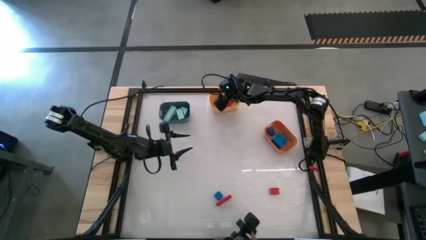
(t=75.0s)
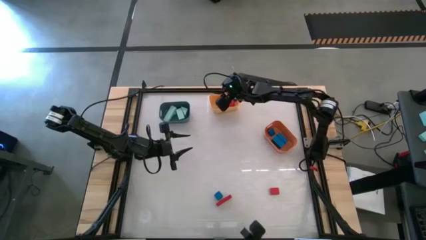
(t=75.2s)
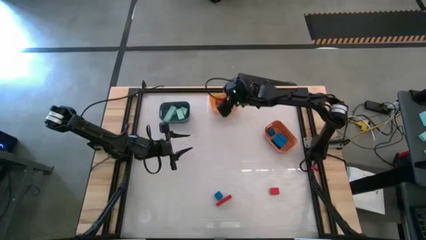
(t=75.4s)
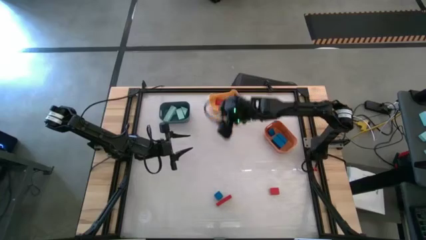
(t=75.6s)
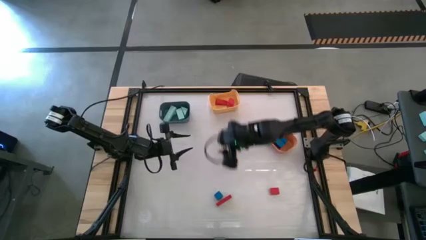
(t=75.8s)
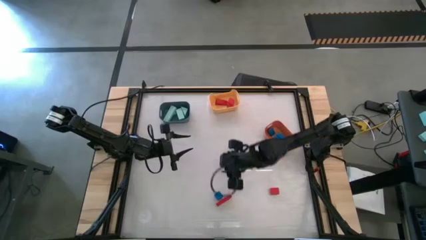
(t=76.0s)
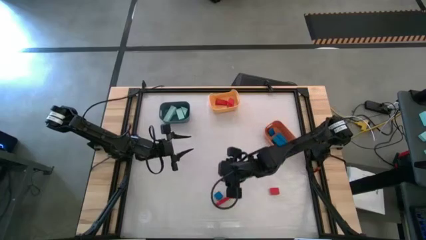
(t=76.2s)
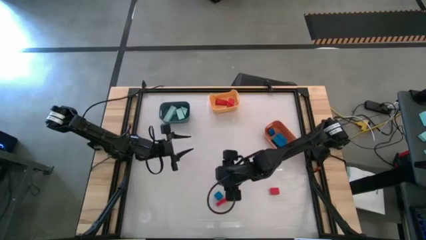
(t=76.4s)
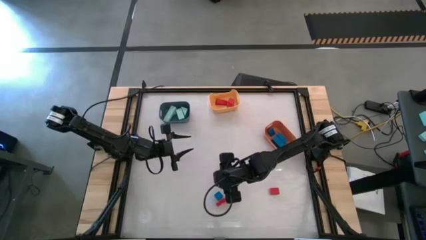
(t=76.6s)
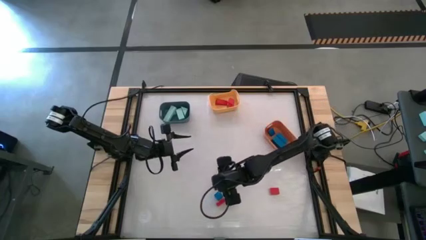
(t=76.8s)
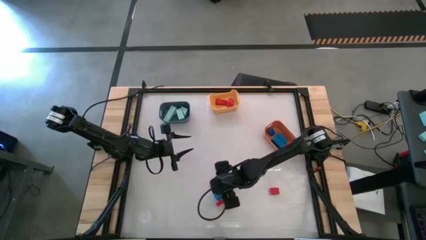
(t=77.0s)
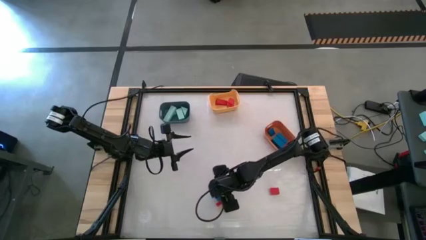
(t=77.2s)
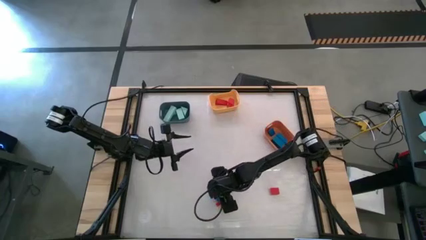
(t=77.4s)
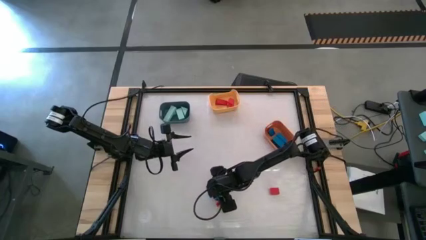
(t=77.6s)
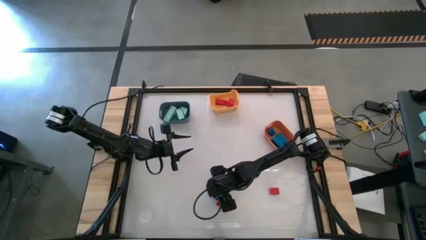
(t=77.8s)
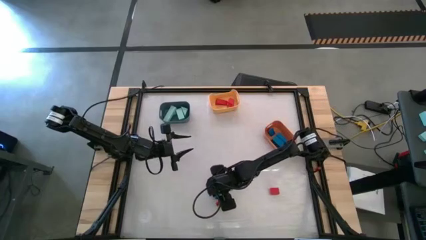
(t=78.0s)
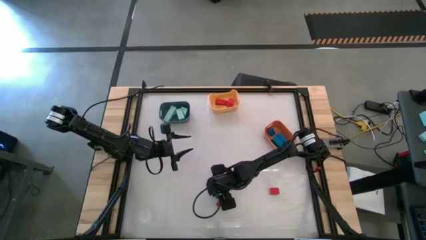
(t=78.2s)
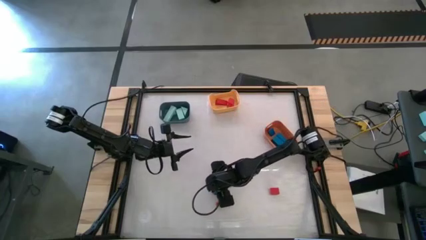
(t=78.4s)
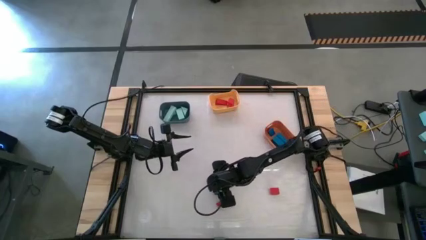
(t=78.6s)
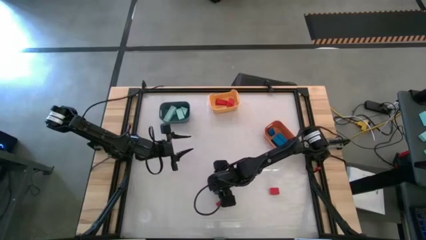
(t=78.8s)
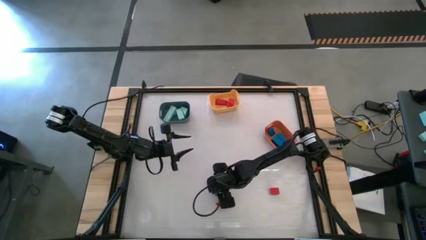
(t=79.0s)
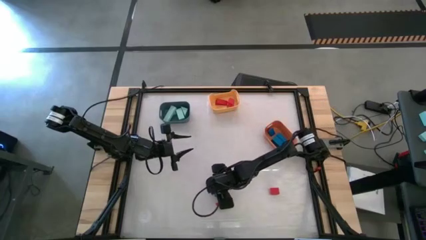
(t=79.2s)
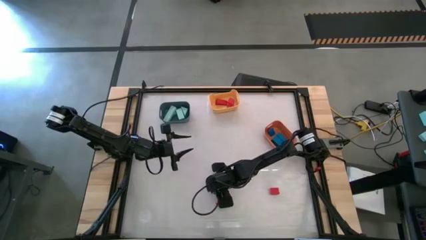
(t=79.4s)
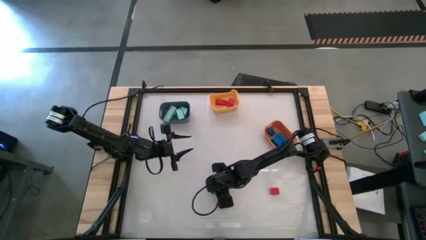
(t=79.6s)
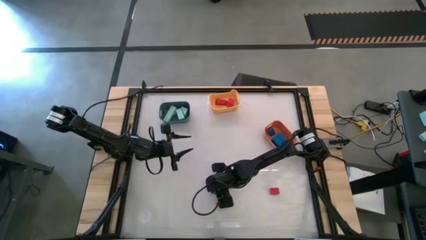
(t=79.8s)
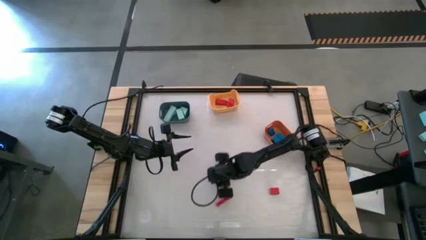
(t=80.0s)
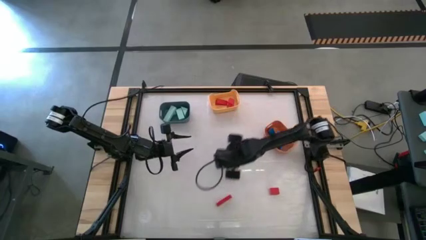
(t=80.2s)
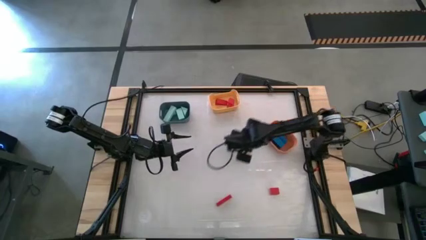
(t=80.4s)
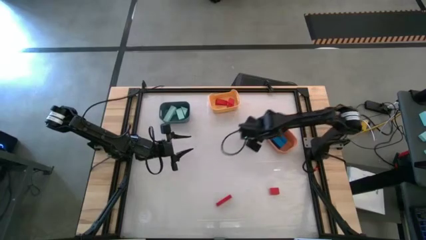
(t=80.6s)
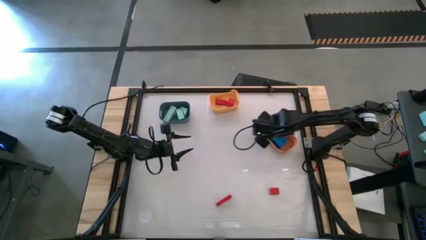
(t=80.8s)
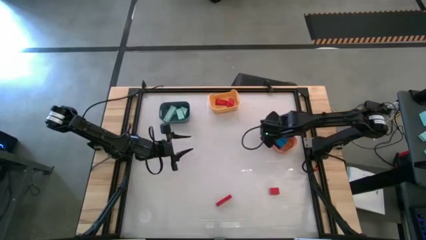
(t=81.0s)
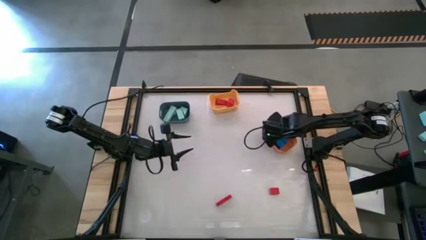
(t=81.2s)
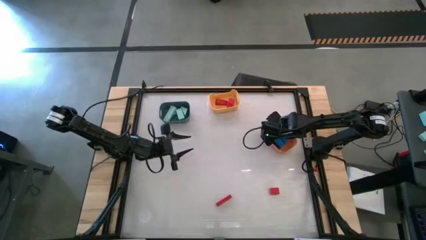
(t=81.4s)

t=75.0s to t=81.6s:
Task: Sort & place blocks by color
Put the blue block into the orange bin

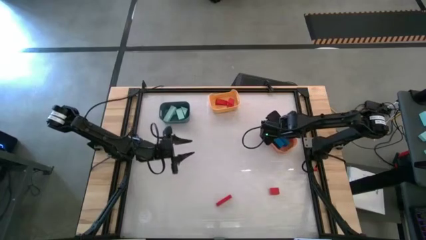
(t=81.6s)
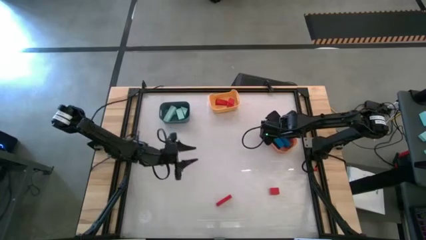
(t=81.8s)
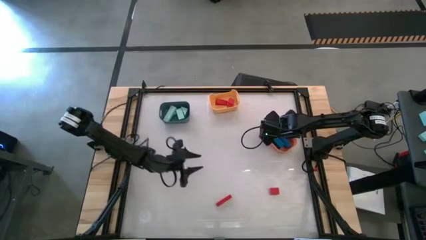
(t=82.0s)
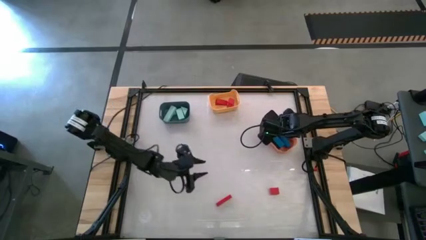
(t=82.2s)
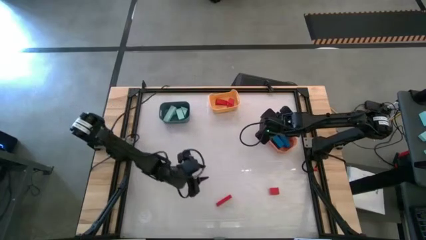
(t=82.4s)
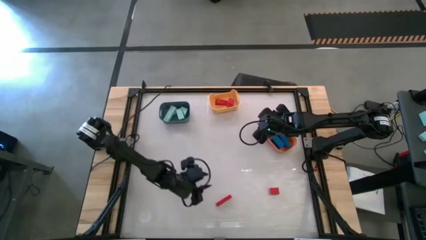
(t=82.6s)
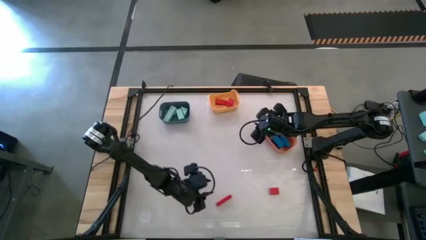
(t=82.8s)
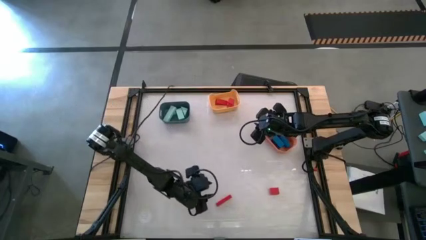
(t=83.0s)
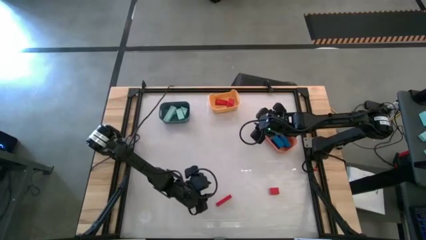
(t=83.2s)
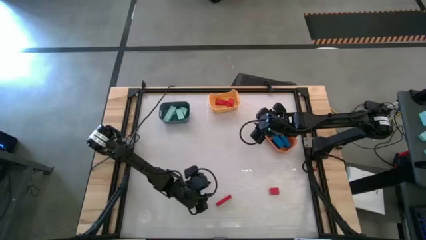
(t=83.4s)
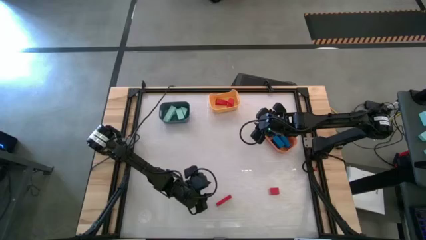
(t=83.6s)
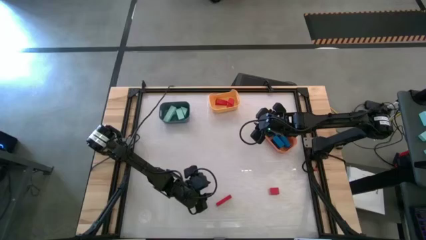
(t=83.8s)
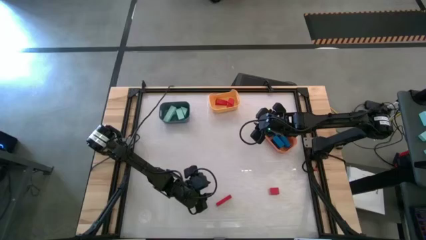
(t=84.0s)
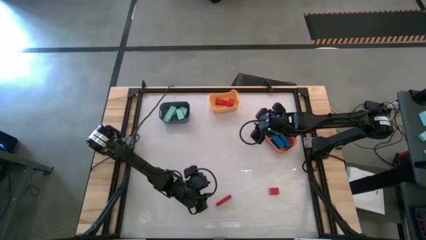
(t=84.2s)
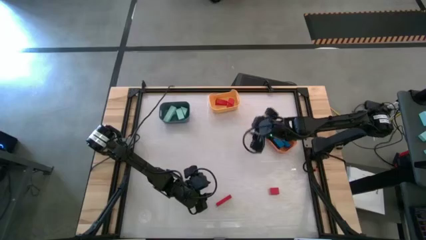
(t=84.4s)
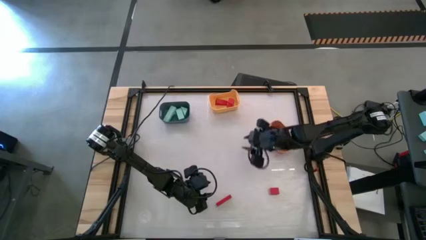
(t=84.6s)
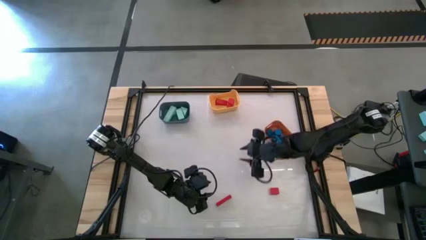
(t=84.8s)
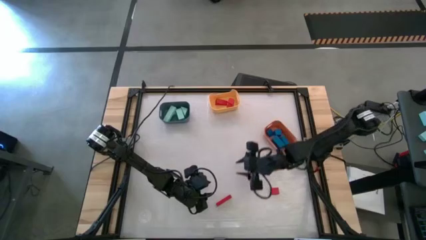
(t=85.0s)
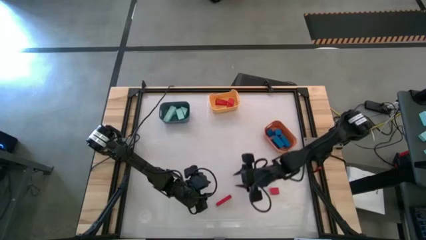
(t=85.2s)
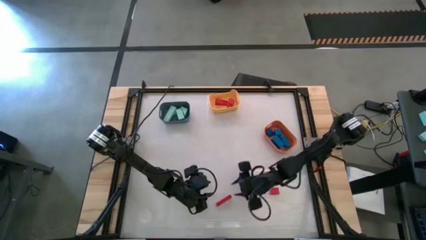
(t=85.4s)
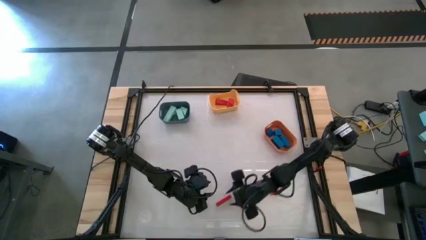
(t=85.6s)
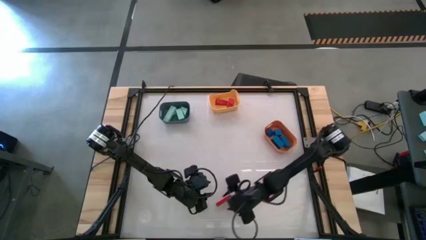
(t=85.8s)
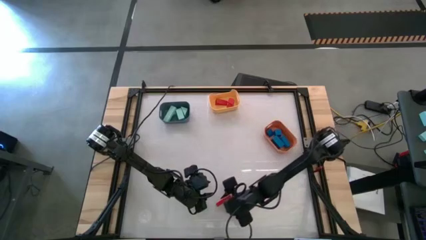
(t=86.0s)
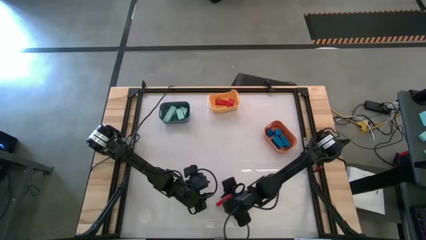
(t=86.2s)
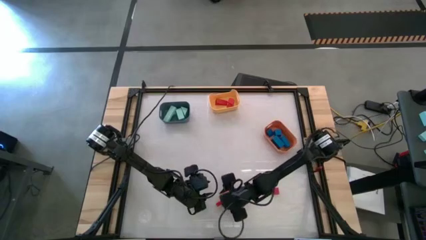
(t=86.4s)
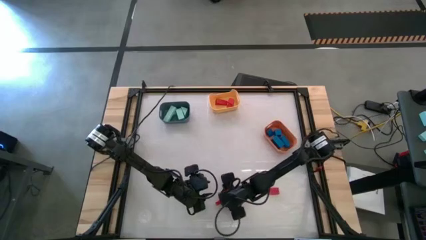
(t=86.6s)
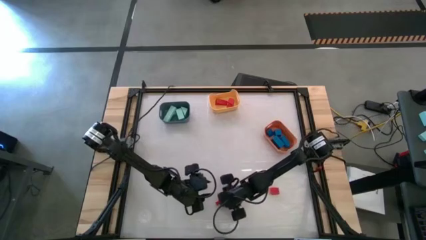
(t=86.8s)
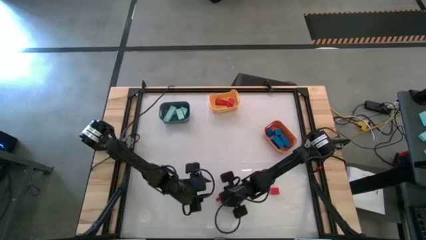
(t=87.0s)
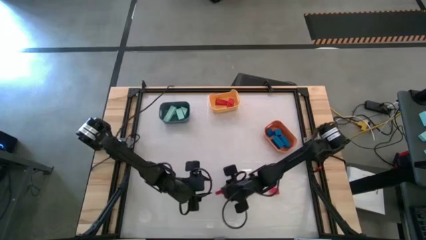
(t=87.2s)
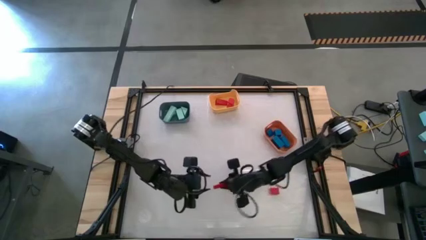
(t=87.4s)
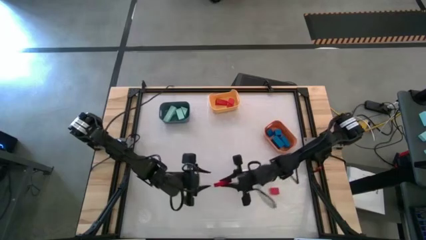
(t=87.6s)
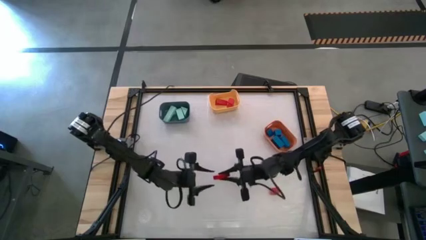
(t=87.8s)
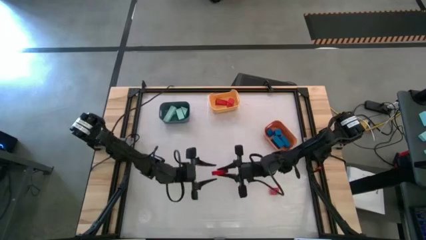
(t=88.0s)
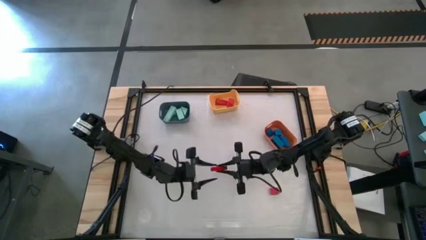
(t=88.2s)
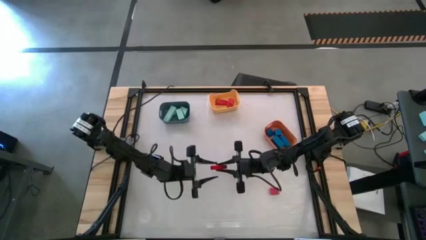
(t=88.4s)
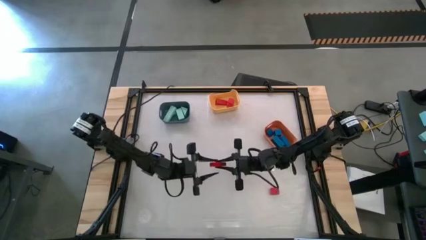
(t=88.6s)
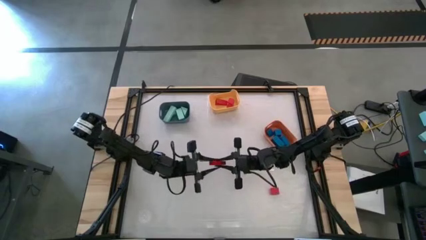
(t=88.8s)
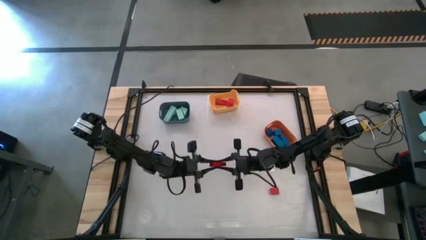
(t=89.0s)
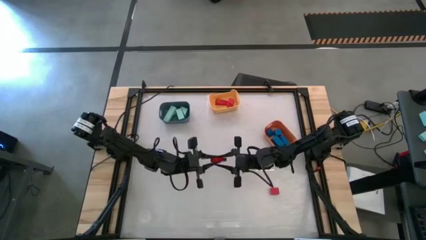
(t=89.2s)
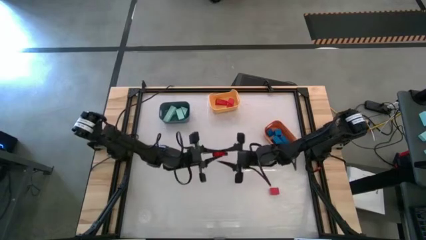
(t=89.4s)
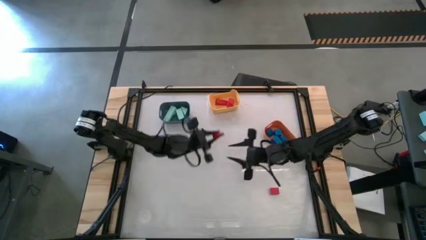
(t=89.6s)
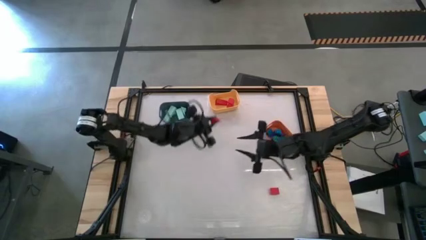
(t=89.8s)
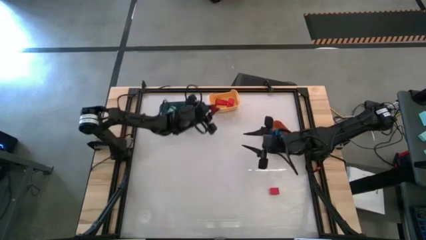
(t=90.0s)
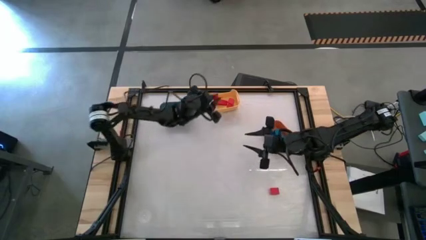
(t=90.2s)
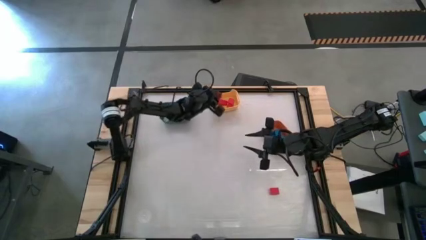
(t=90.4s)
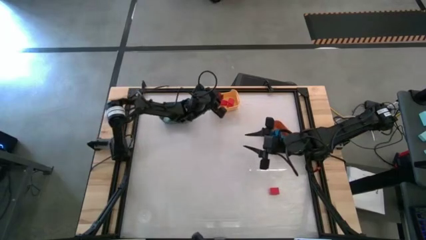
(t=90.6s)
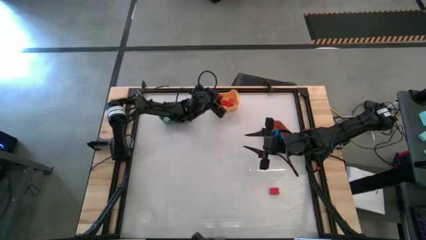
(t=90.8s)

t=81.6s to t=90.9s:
Put the orange block into the yellow bin
